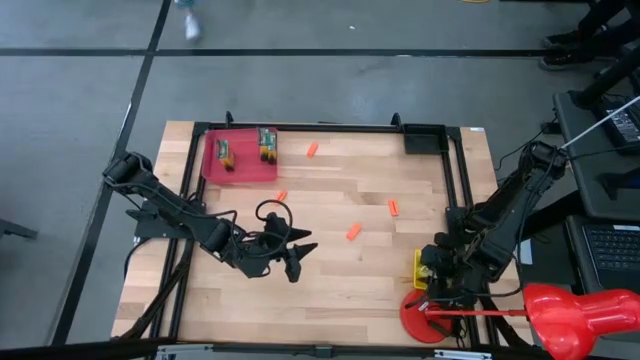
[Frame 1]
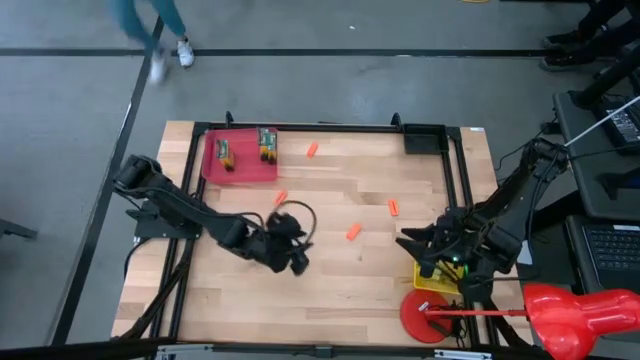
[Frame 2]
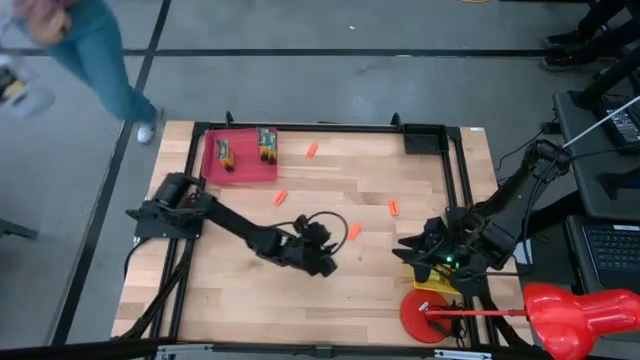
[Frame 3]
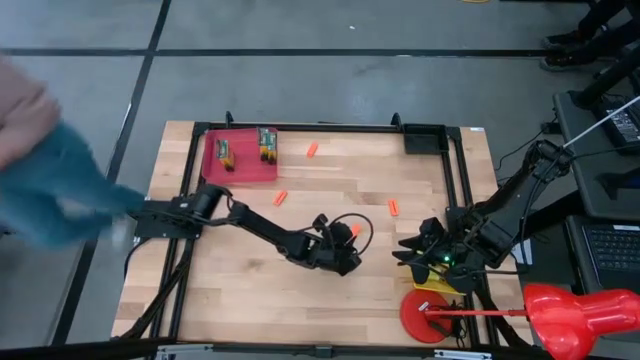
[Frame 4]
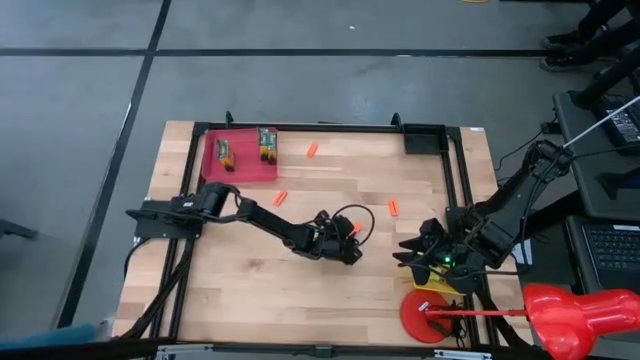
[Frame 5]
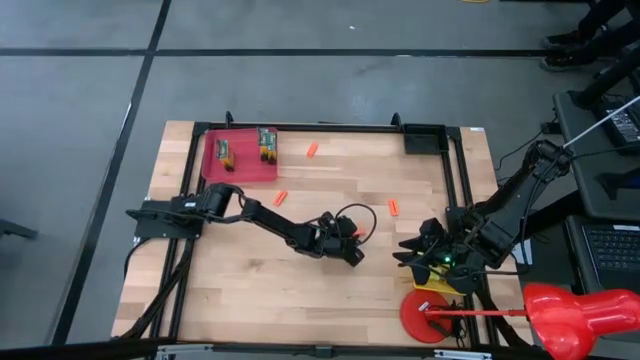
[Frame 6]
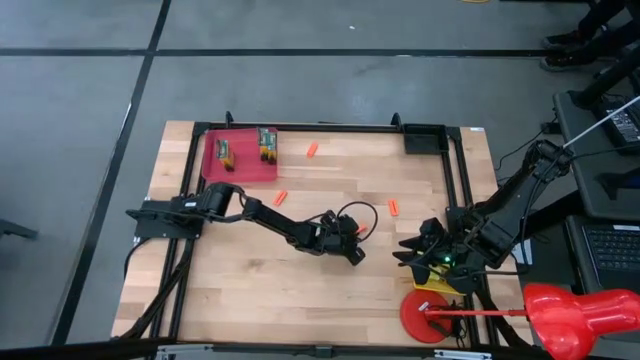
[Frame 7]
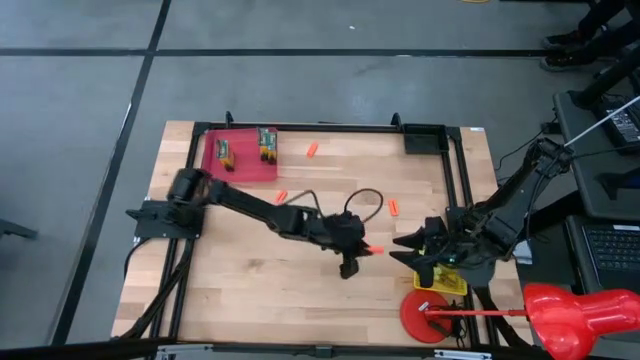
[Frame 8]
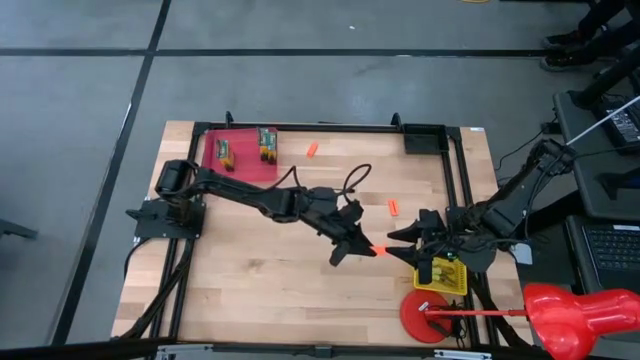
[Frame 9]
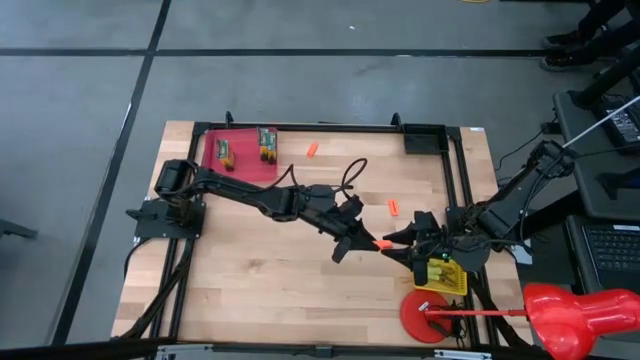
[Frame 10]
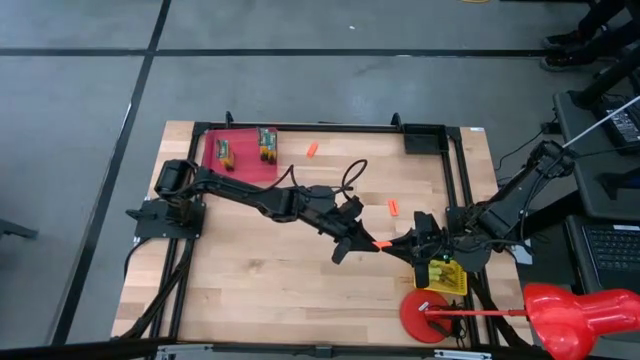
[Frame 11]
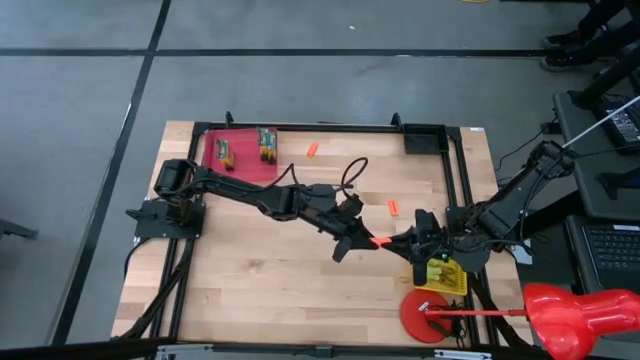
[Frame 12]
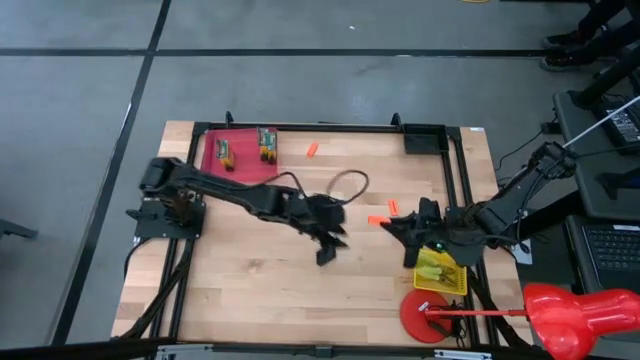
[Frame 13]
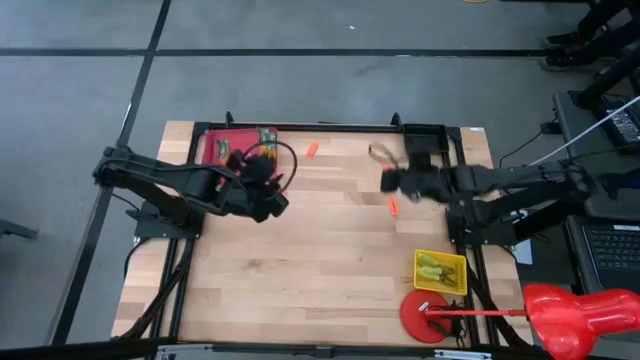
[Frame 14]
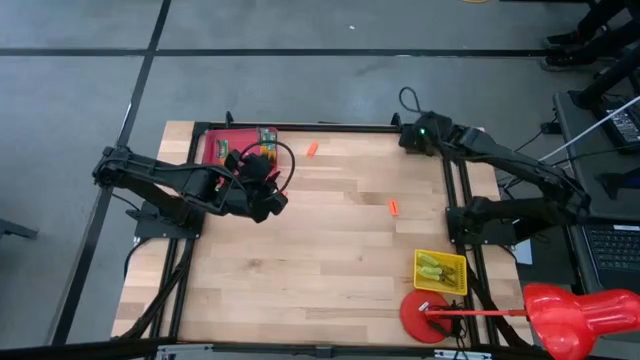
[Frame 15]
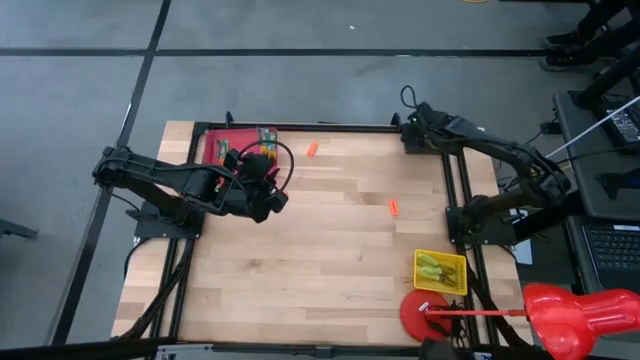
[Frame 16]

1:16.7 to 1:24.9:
Task: Pick & Place School Supplies
Put the orange eraser into the black bin

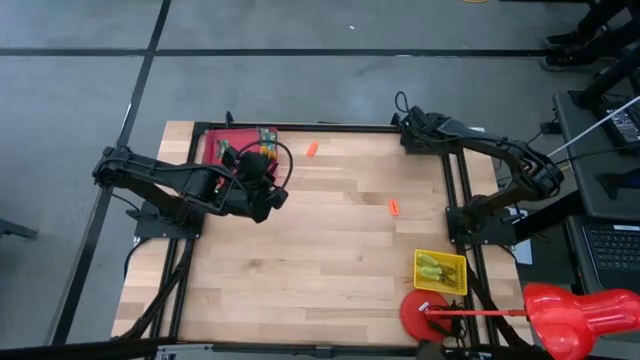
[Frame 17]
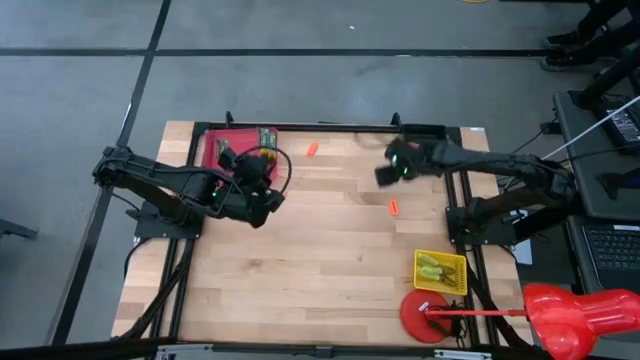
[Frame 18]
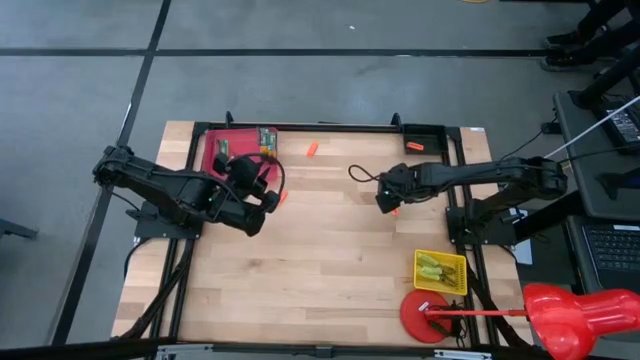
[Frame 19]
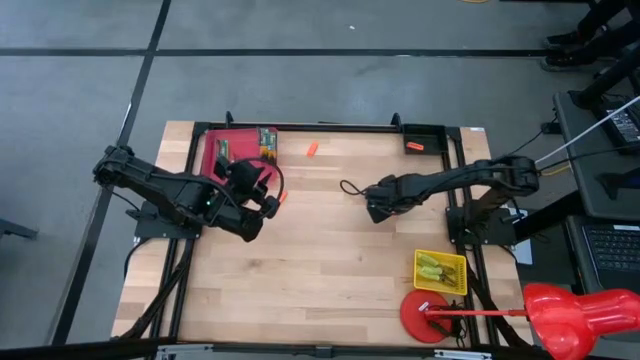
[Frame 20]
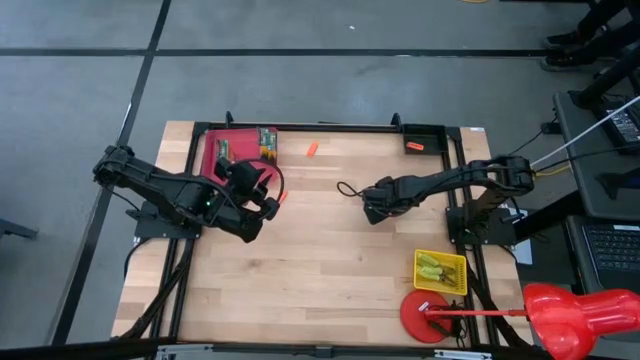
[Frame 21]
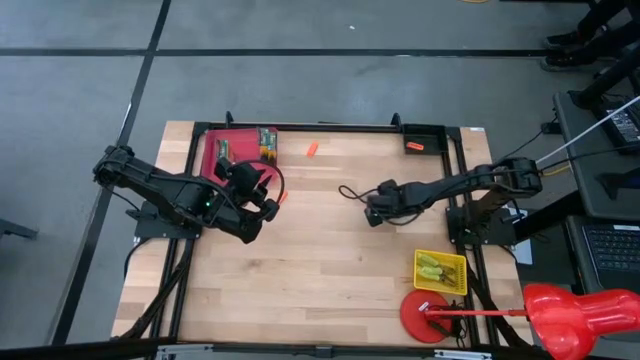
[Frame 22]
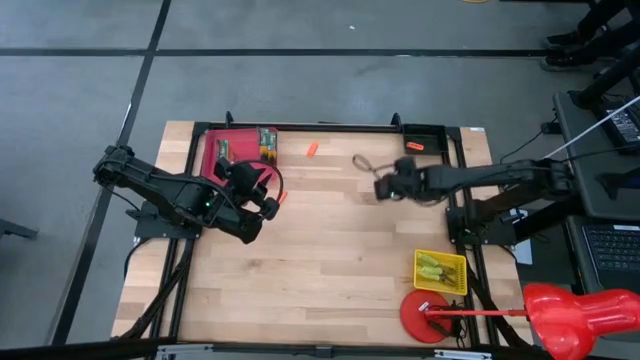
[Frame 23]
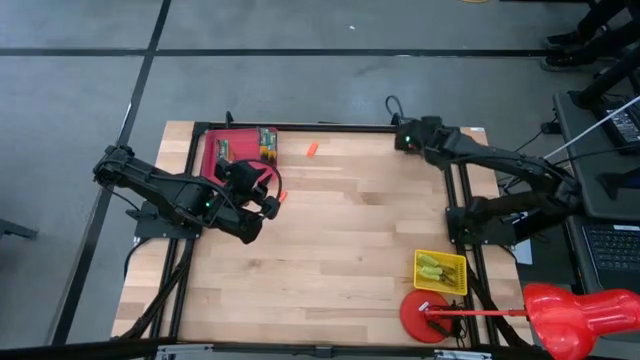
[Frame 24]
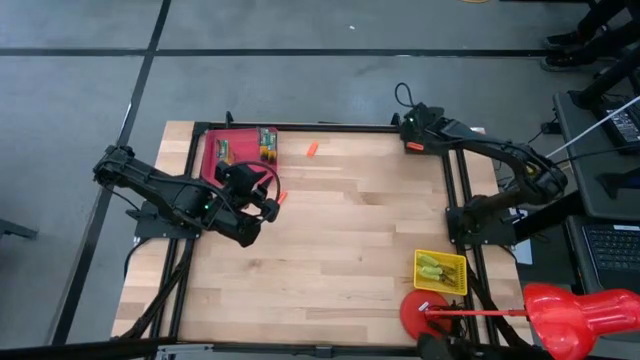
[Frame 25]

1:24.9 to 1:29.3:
Put the orange eraser into the black bin

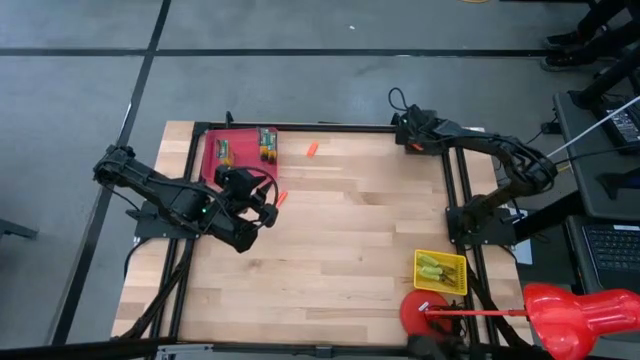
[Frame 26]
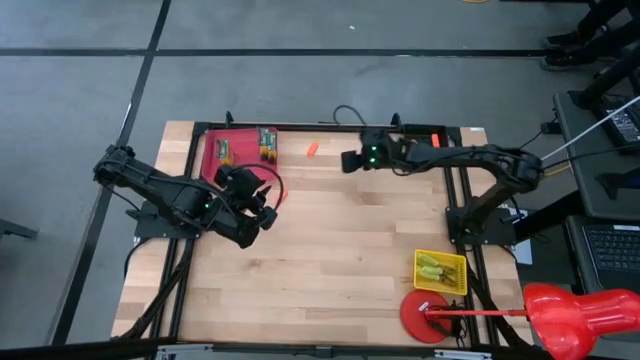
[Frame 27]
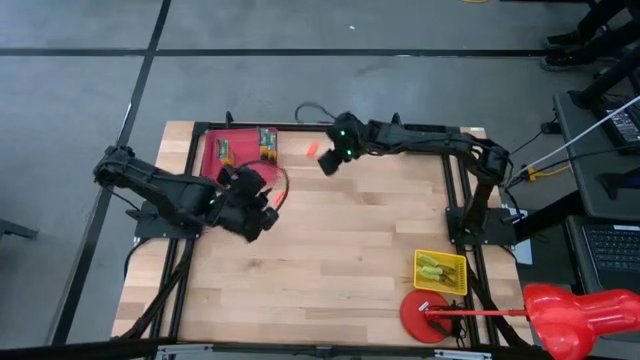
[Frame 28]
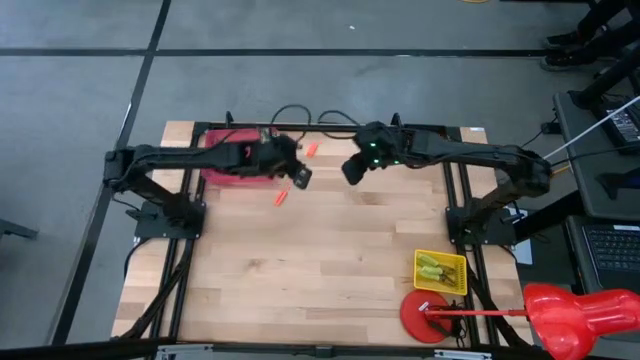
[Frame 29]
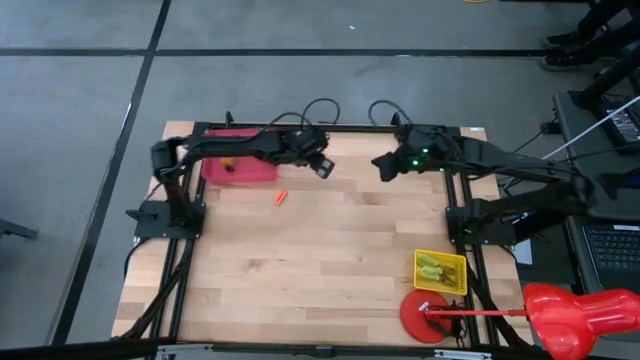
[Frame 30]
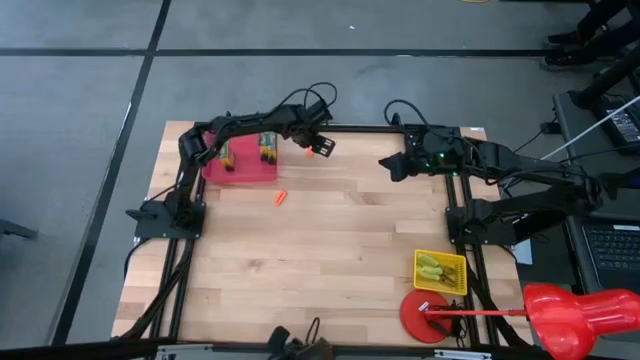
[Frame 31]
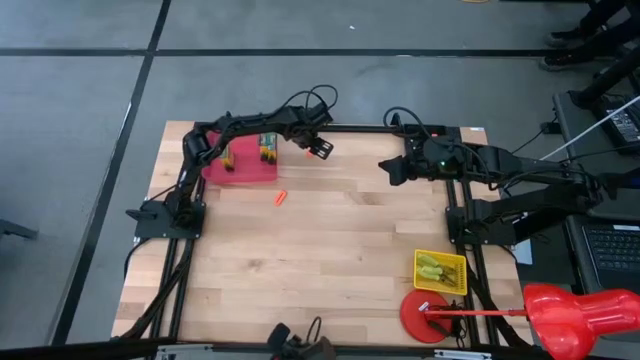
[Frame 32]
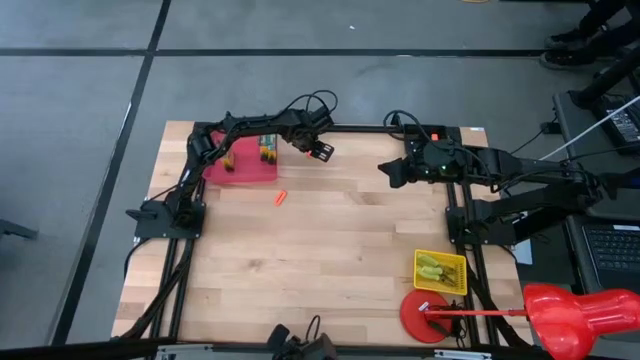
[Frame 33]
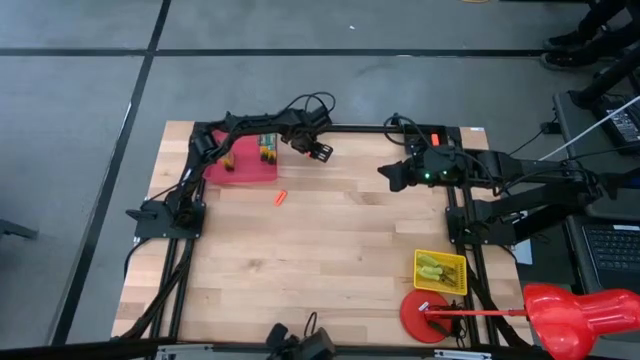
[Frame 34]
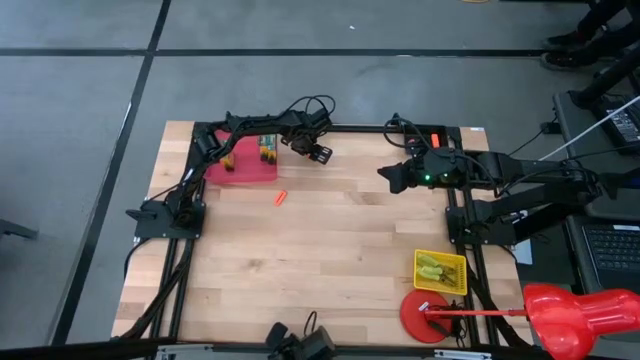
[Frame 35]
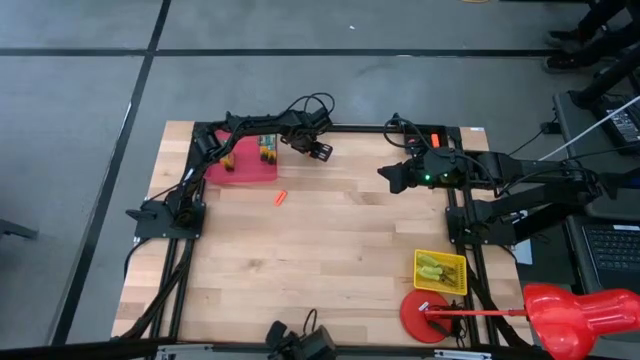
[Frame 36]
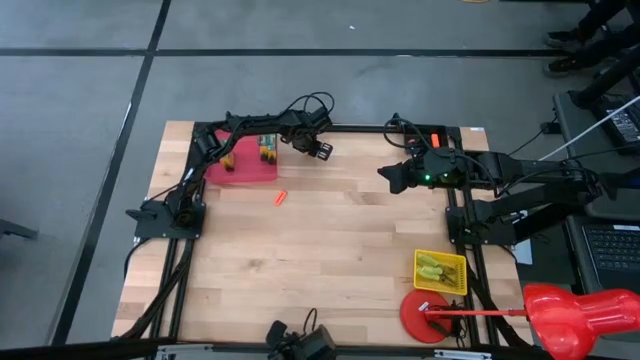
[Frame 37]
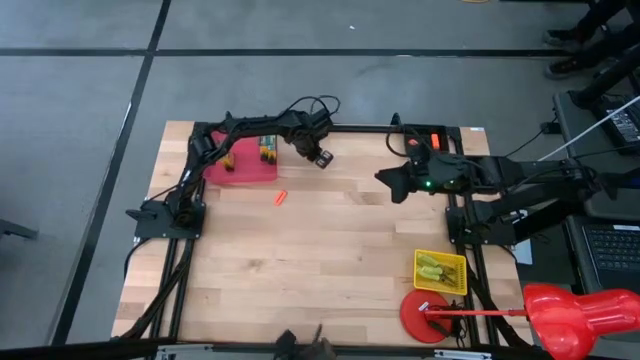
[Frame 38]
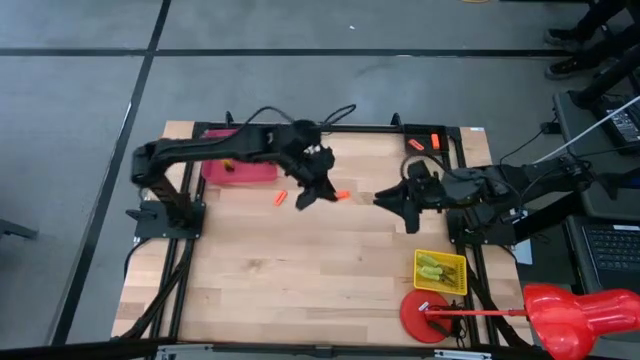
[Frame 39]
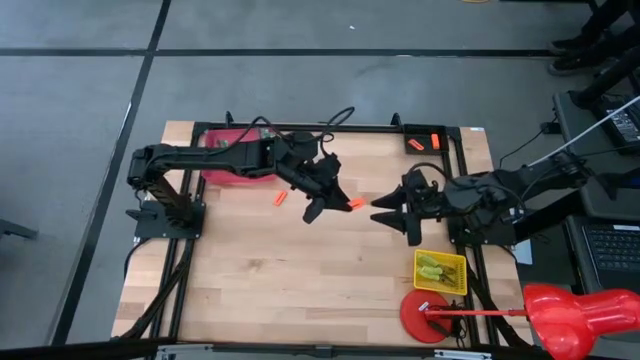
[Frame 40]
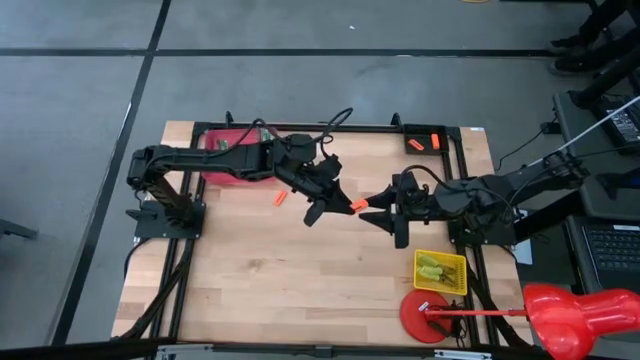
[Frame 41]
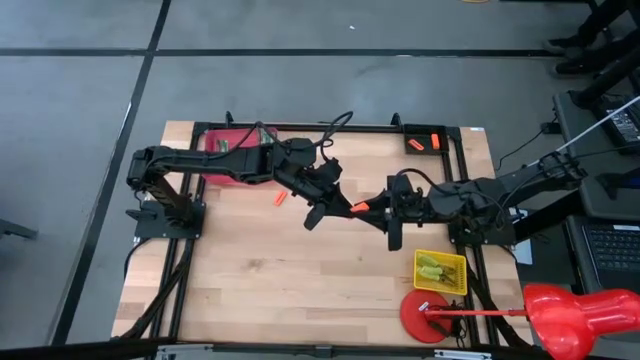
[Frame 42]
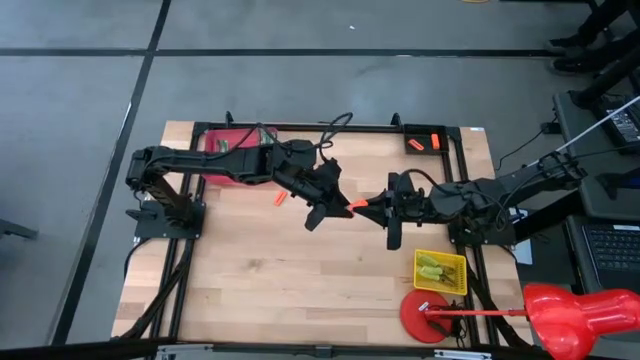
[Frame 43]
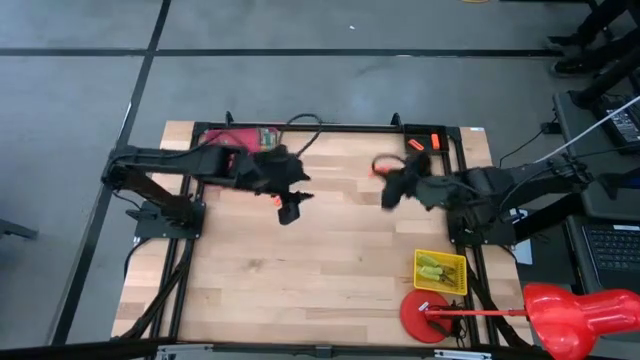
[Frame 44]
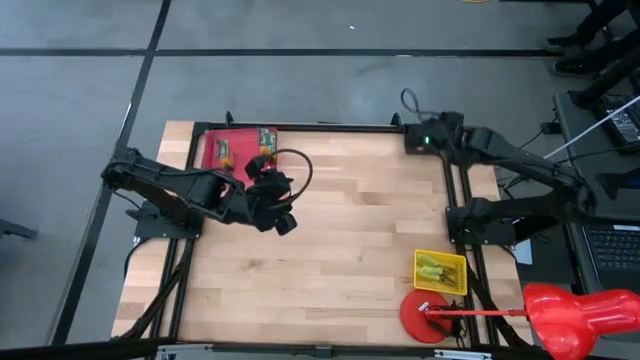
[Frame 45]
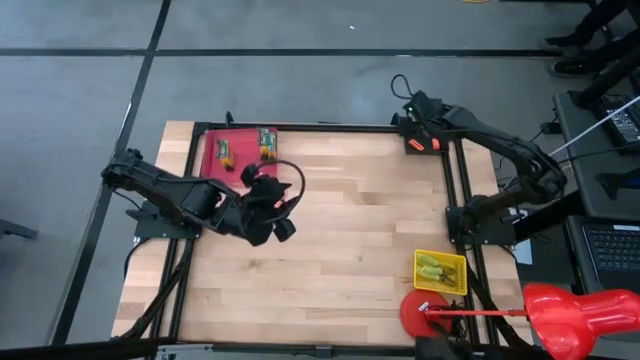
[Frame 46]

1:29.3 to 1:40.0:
Put the orange eraser into the black bin
